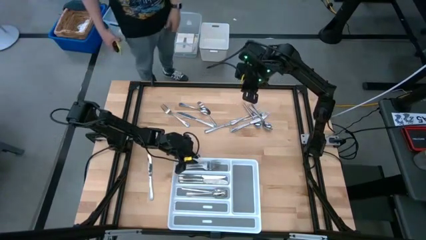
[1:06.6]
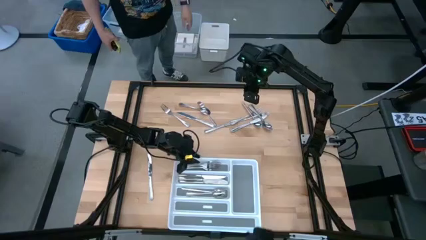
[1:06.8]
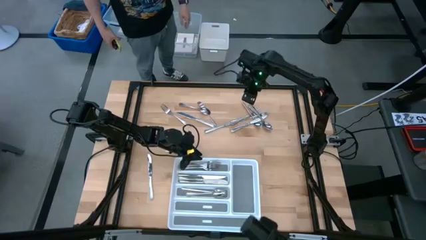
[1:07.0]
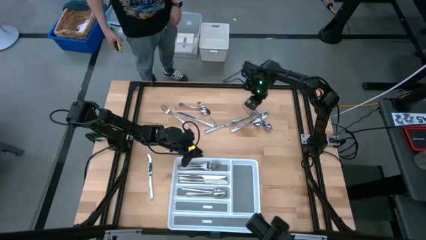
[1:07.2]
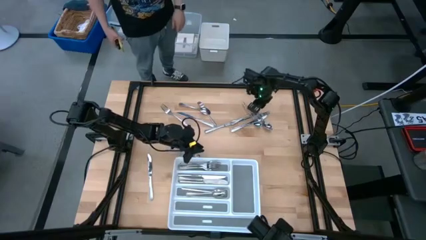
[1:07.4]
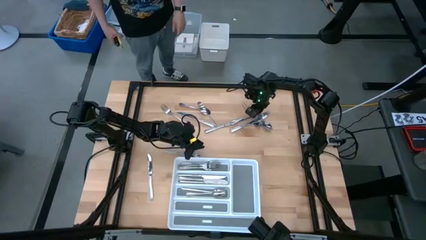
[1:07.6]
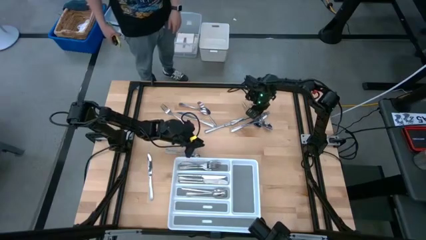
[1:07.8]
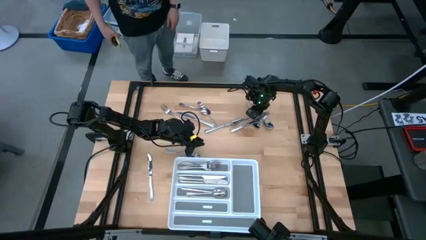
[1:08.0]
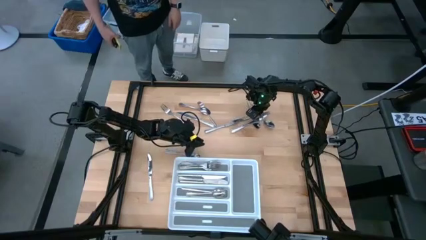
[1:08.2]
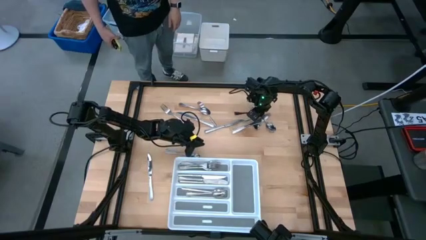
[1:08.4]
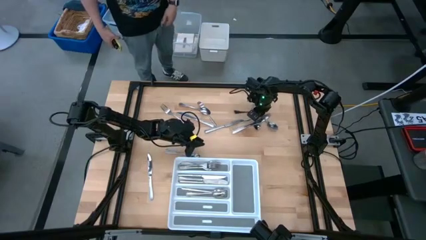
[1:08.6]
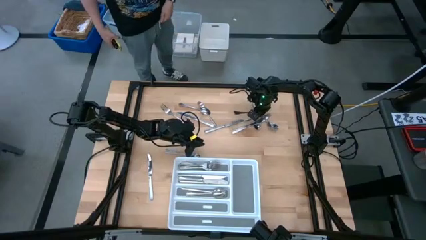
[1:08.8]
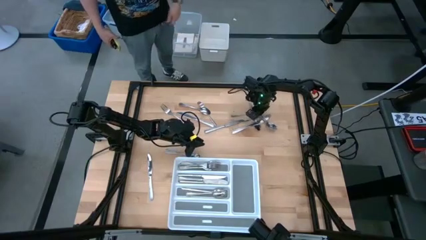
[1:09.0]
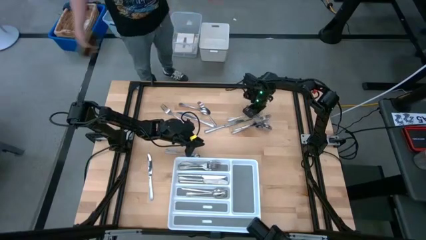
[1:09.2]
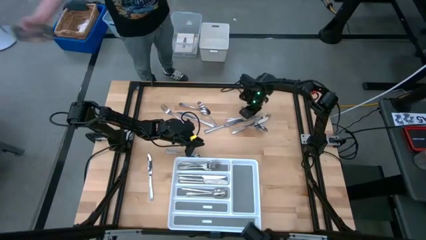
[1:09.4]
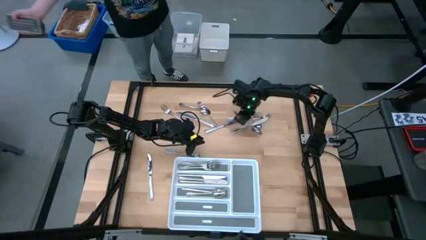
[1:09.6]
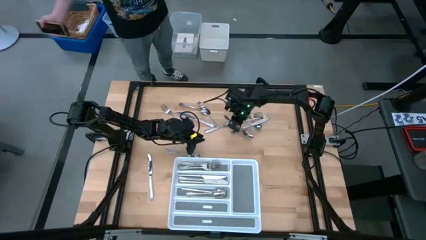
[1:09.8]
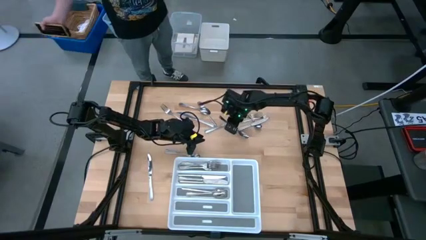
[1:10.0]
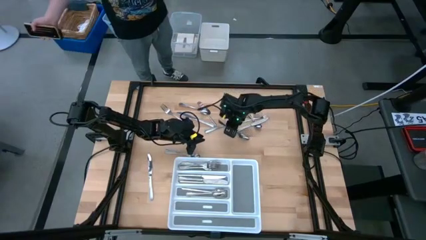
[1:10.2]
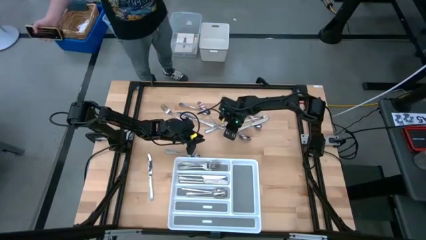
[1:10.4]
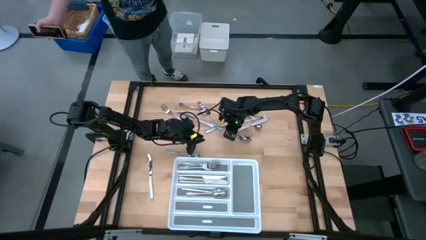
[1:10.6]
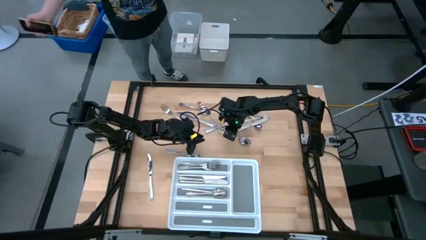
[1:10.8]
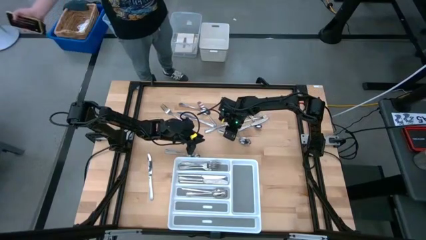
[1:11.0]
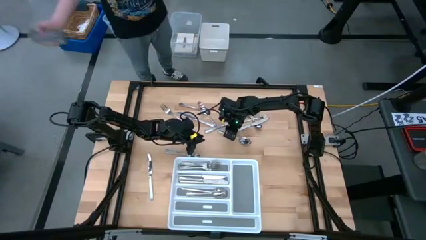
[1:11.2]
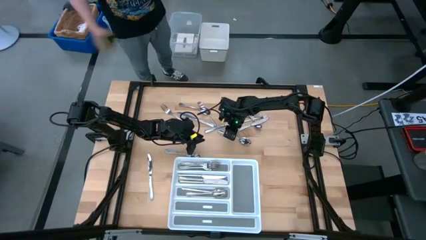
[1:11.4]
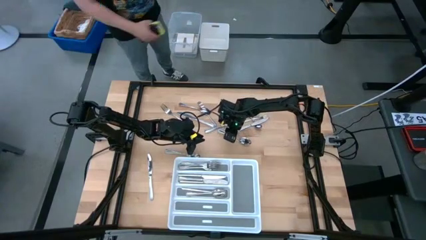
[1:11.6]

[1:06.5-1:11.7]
Task: Sort silverware
Put the silver spoon into the bottom section of the white silverware tray

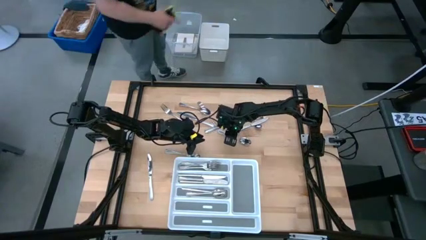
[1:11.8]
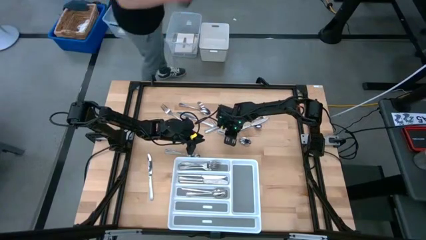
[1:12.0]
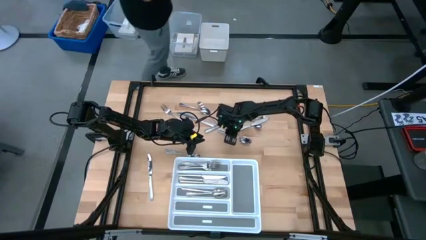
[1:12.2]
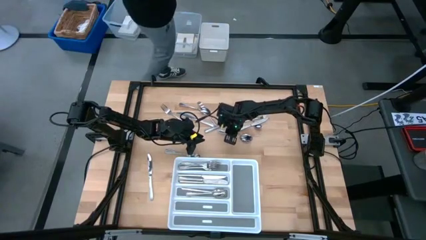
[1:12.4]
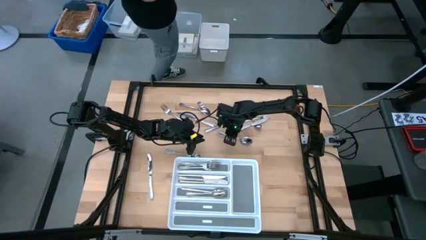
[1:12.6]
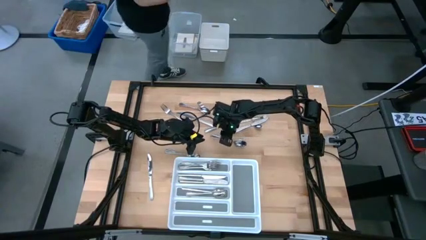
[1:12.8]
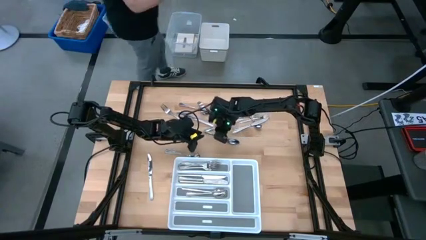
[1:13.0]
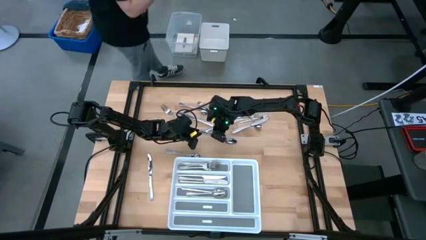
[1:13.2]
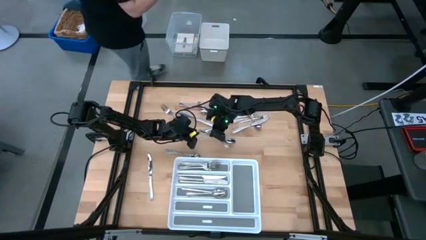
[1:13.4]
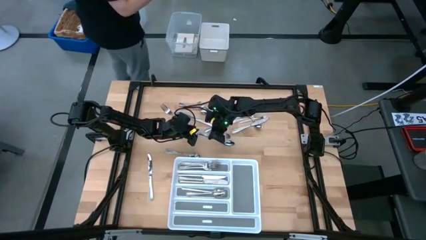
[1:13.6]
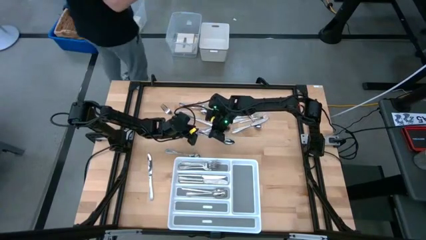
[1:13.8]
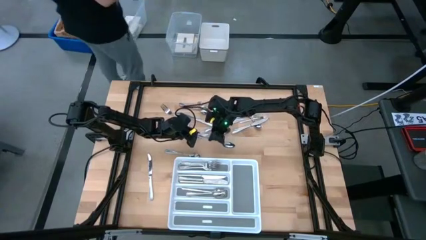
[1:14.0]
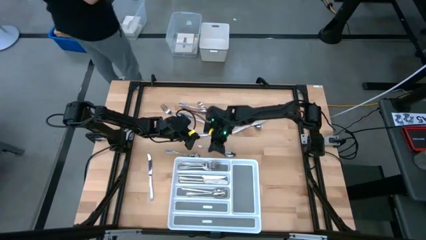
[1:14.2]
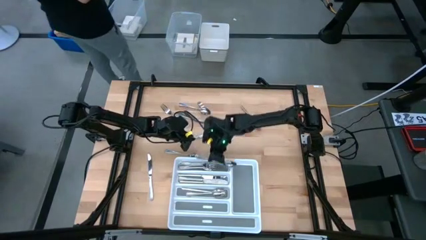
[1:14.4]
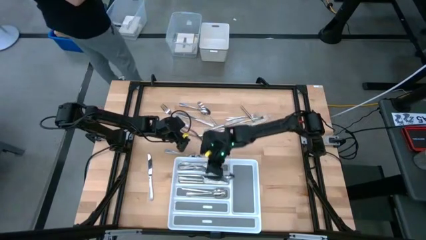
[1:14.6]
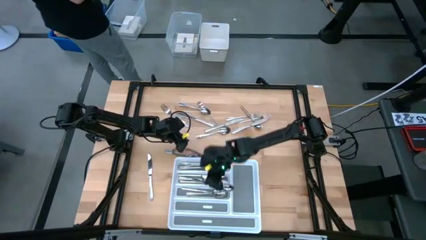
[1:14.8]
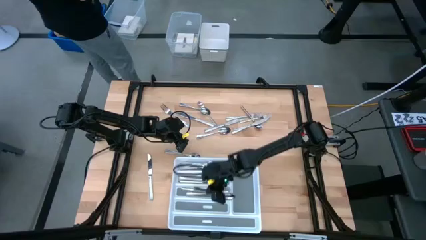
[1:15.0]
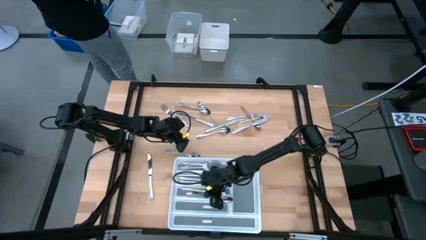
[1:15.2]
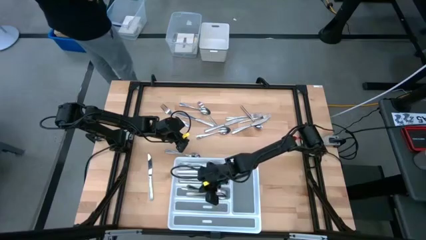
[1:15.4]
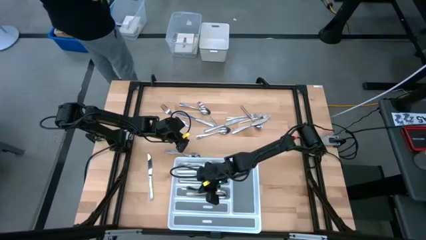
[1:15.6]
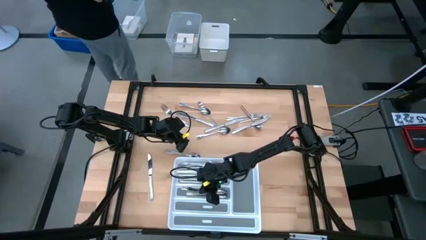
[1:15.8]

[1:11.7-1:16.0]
Put the silver spoon into the bottom section of the white silverware tray

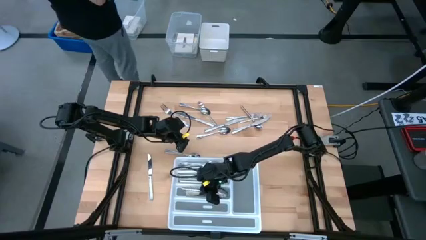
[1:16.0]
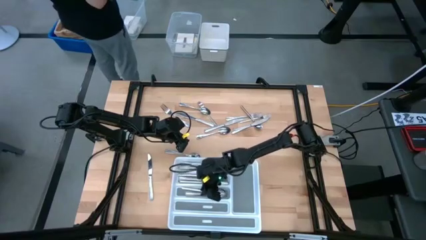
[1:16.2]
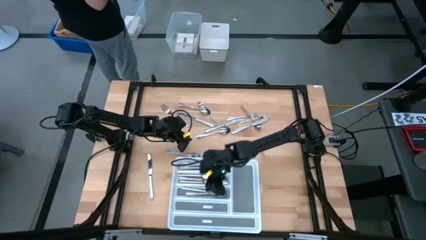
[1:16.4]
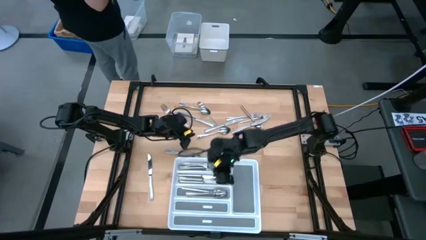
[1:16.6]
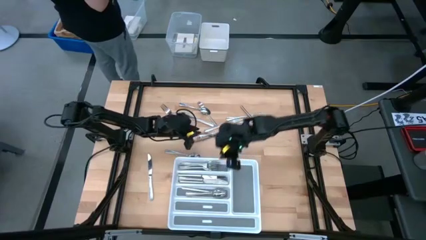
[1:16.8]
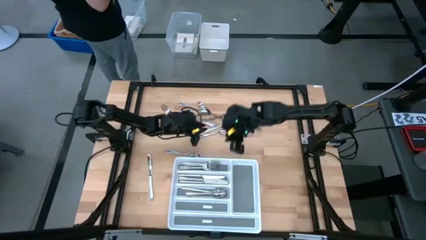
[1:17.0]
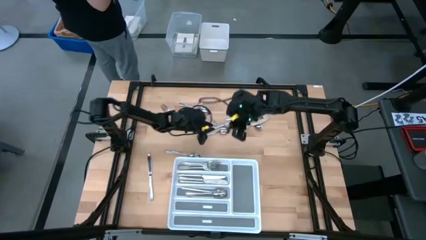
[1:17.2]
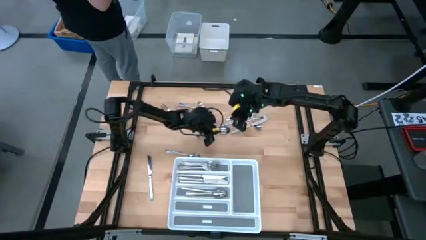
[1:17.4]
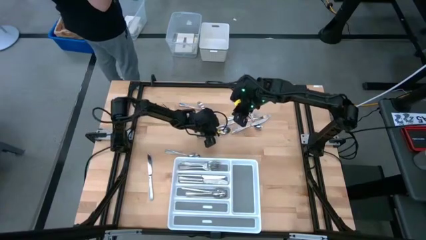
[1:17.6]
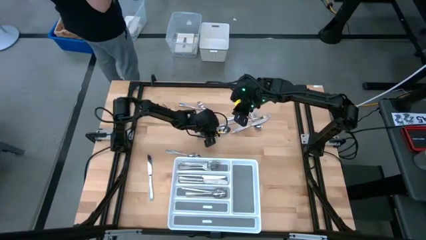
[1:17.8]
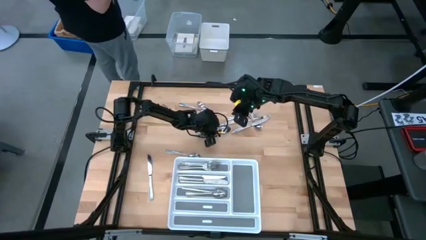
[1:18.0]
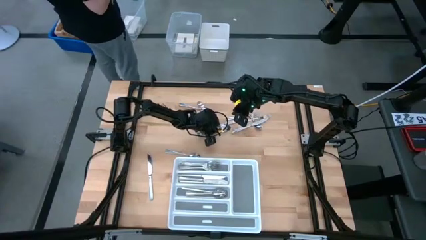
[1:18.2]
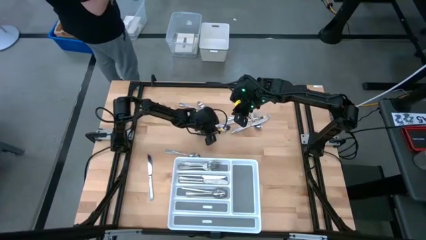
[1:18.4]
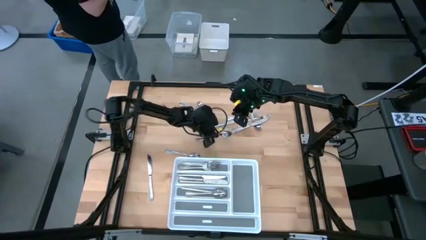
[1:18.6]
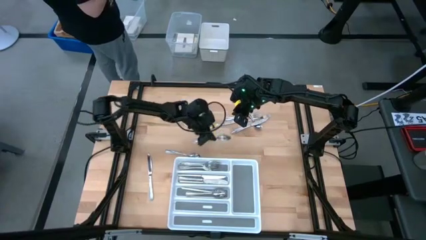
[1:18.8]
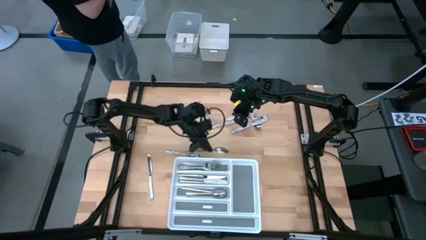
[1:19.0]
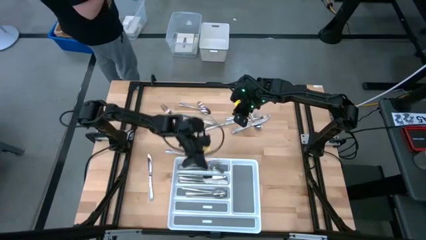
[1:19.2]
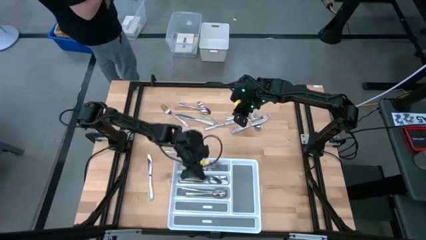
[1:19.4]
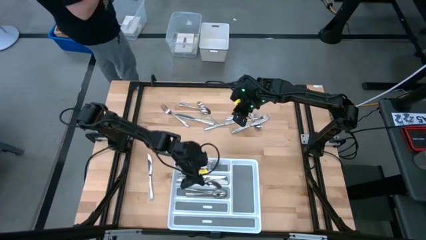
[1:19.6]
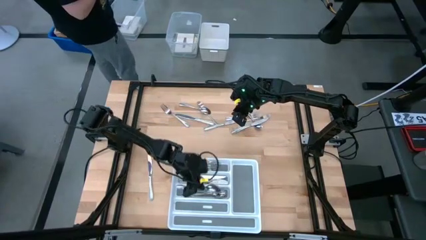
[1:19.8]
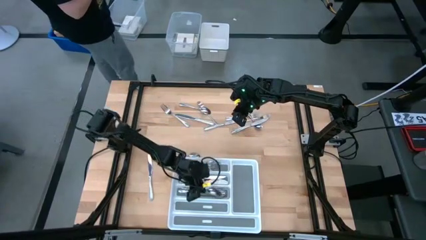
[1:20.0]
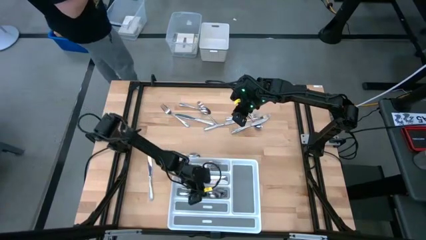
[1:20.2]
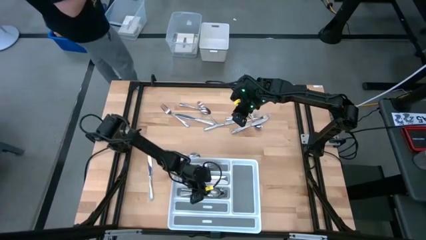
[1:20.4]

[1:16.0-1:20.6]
Put the silver spoon into the bottom section of the white silverware tray

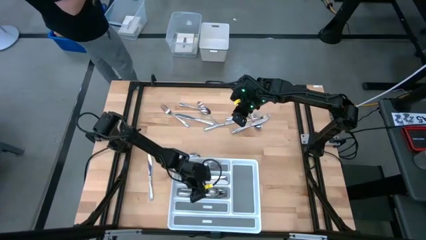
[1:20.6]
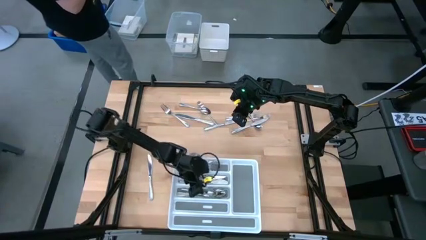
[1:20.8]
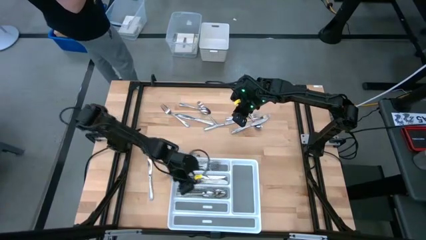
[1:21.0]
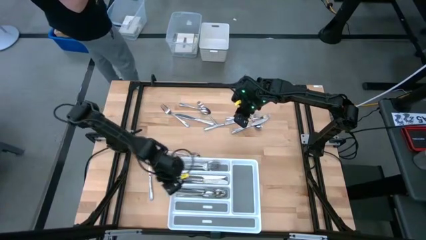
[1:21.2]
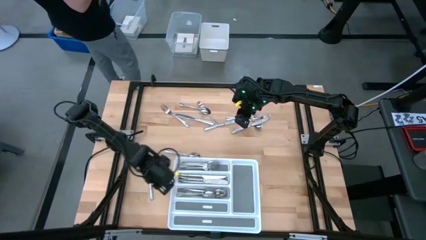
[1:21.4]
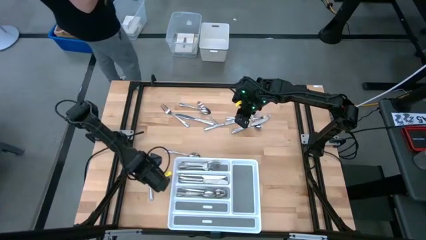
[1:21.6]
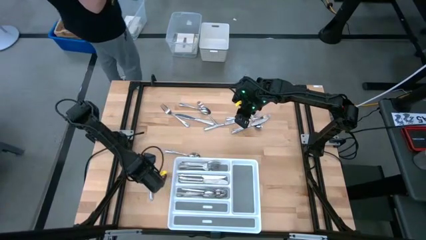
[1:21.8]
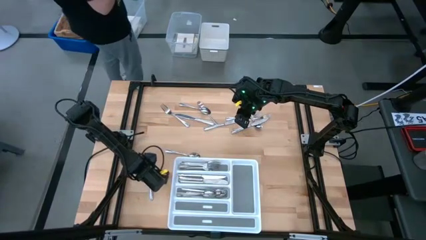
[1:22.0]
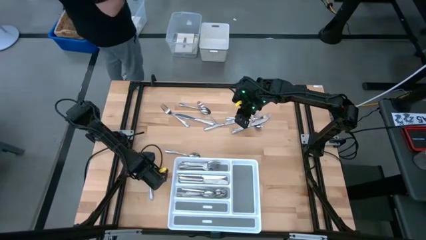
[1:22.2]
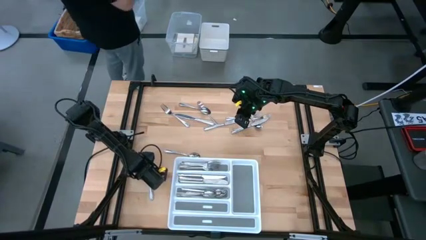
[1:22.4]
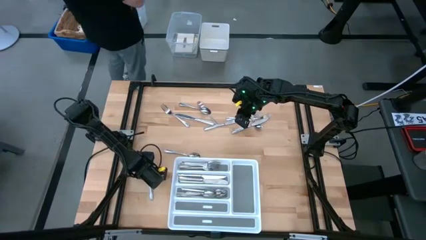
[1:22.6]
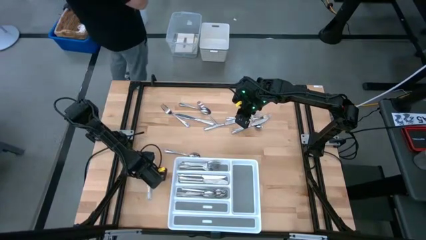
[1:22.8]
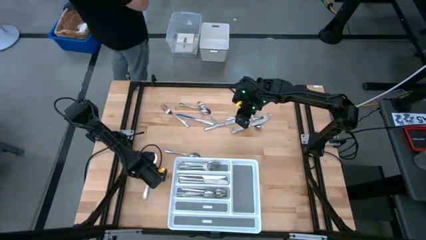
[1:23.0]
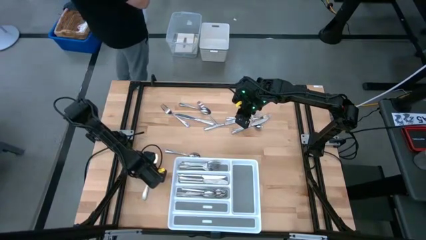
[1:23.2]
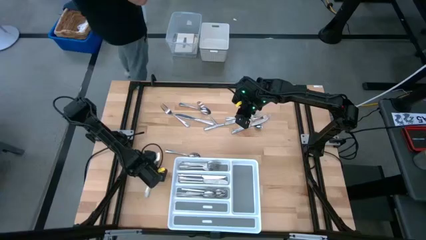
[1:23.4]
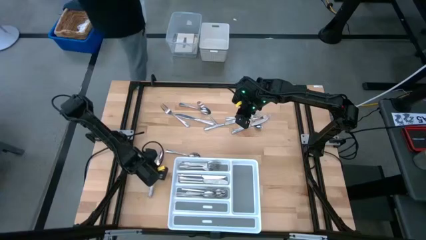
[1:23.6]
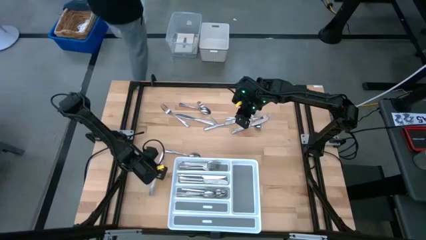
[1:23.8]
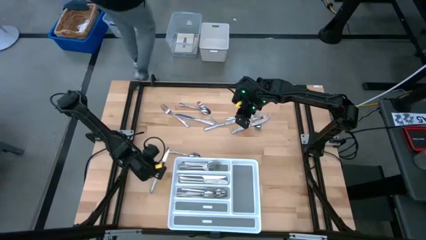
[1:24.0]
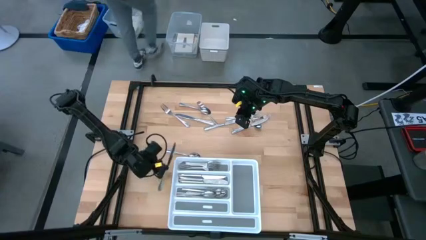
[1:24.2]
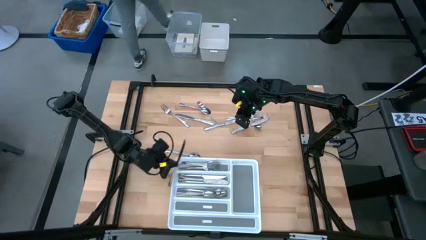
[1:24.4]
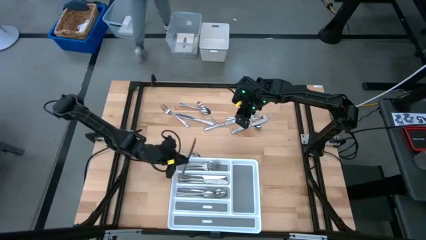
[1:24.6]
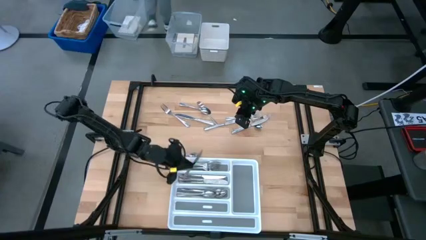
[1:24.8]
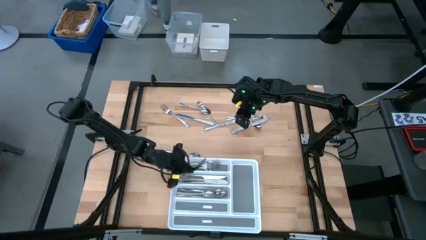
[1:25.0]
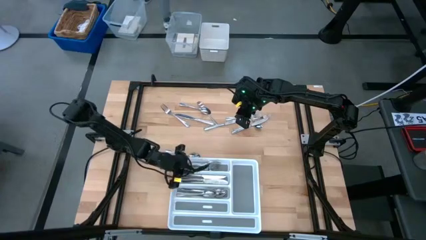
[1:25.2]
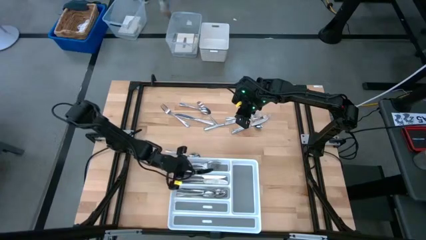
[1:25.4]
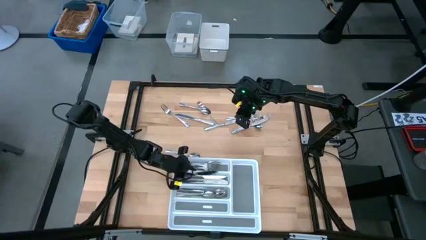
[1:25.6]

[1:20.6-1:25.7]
Put the silver knife into the middle section of the white silverware tray
